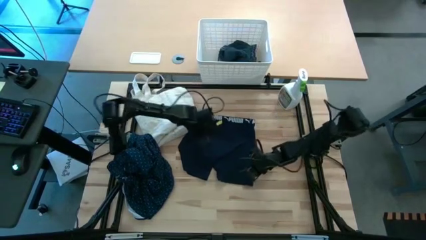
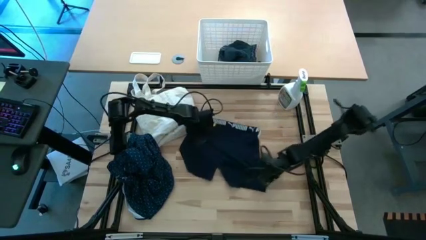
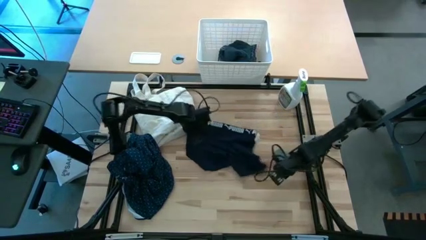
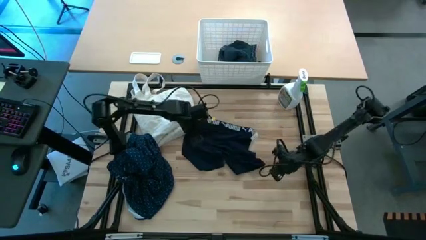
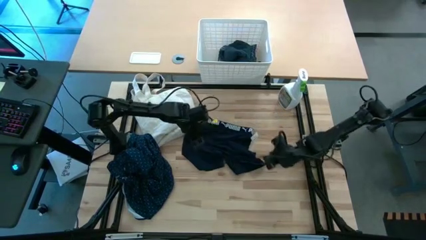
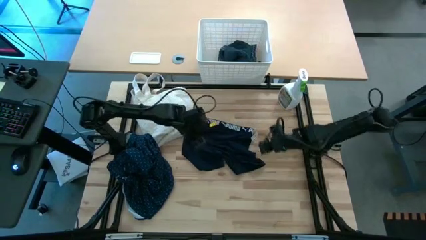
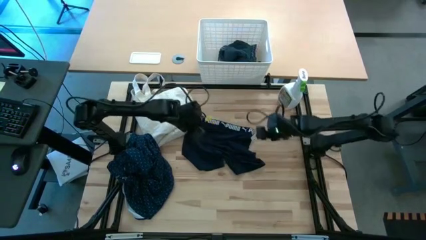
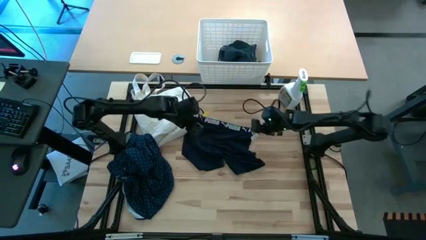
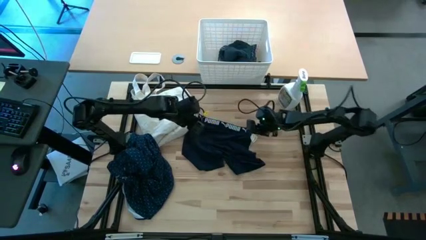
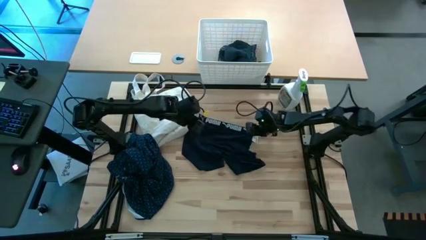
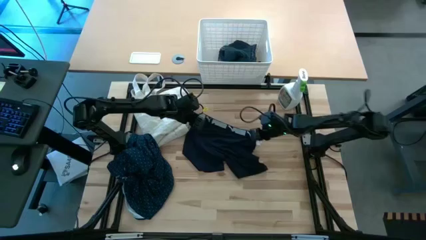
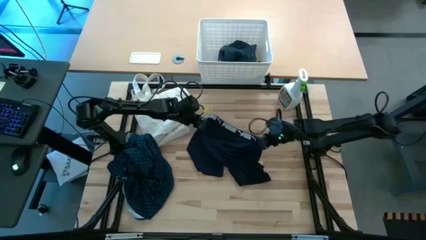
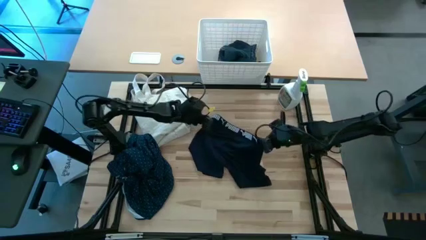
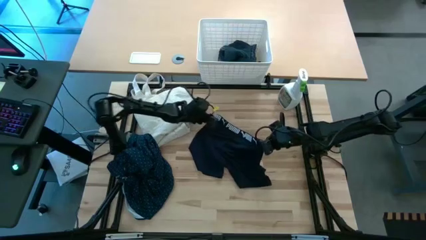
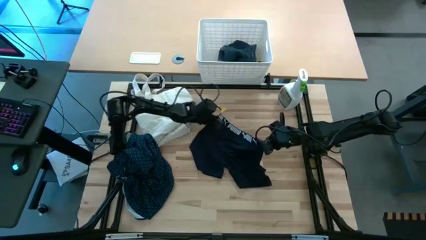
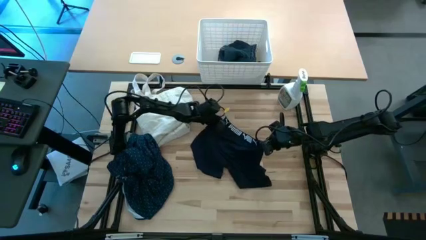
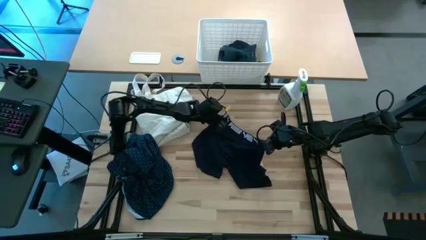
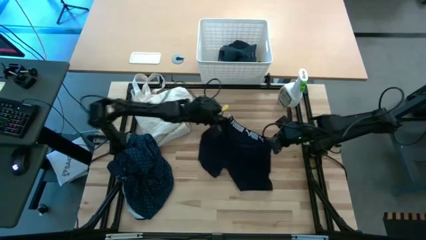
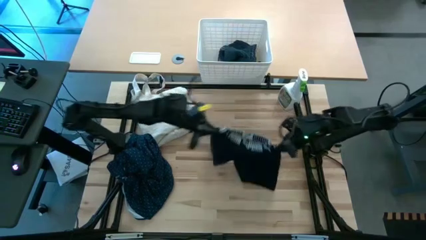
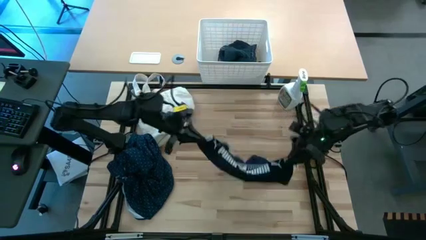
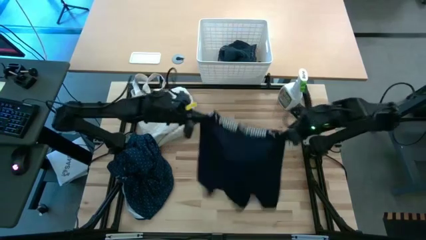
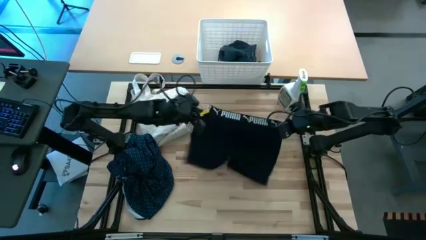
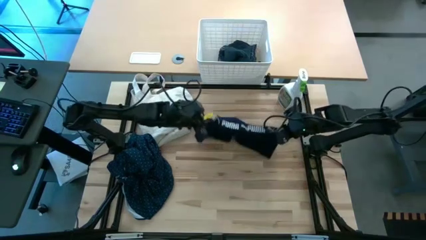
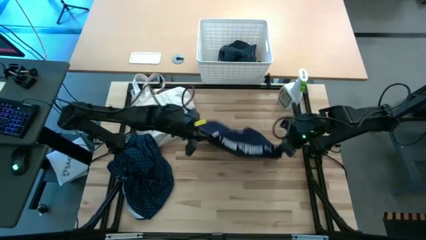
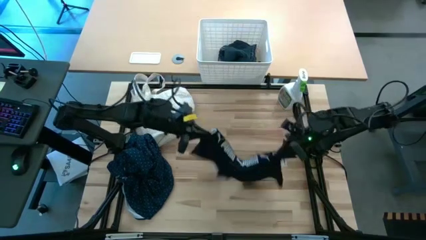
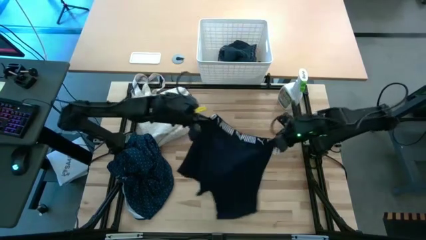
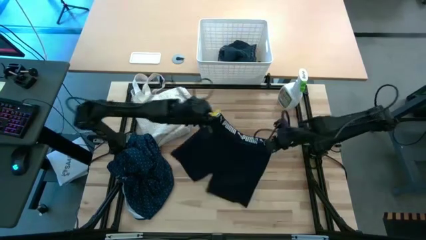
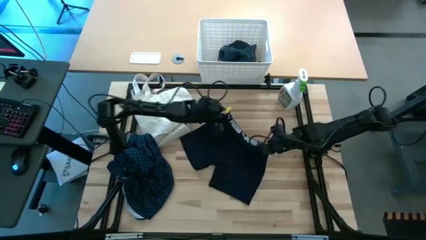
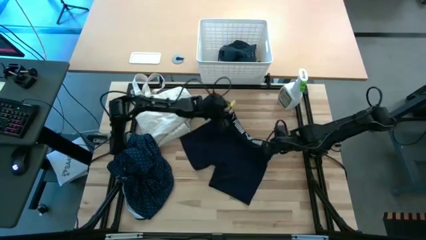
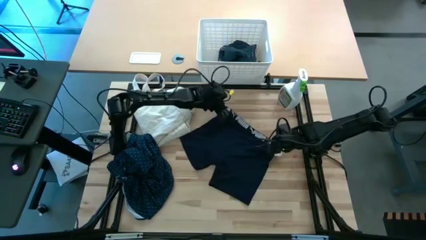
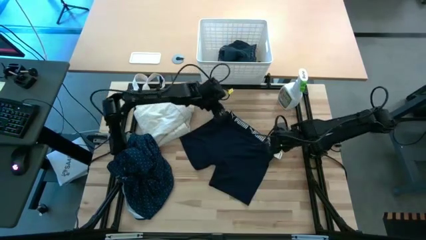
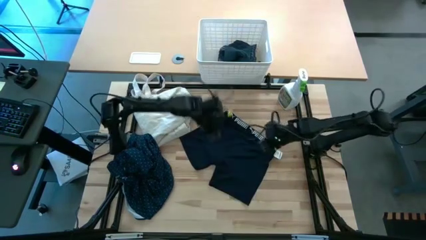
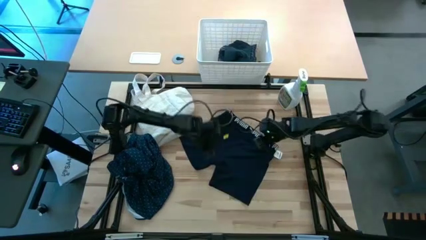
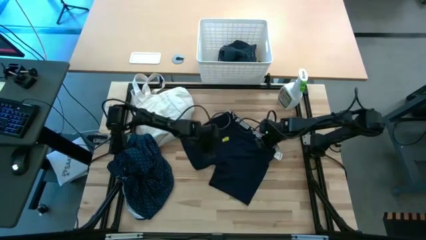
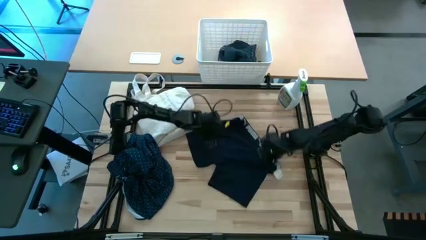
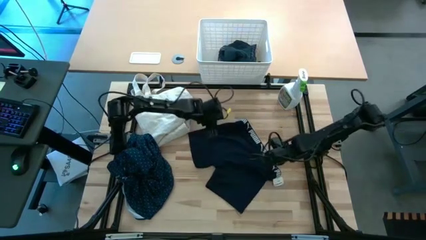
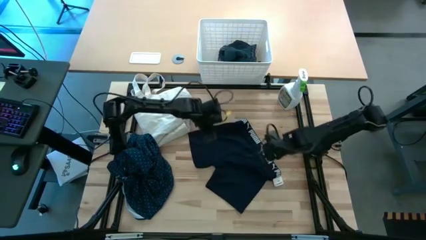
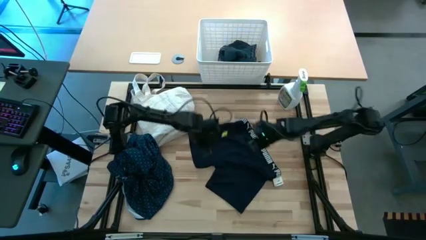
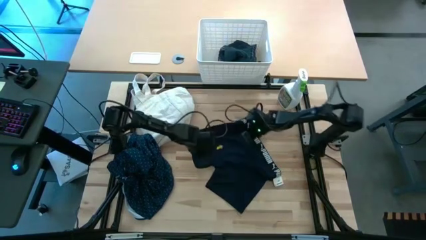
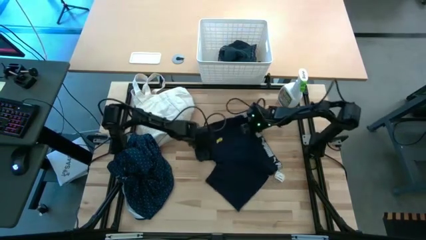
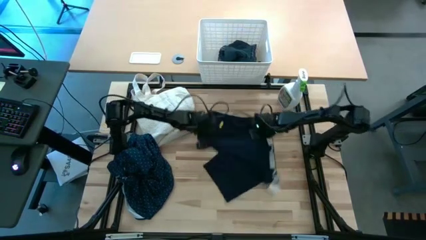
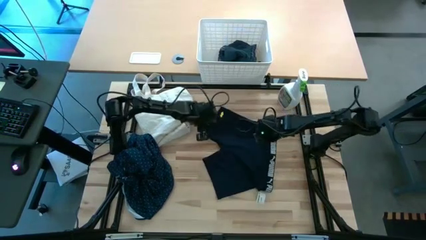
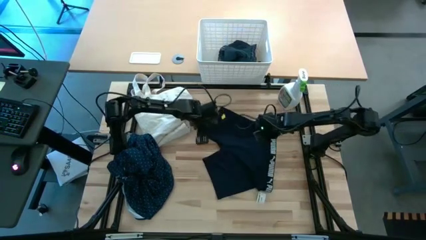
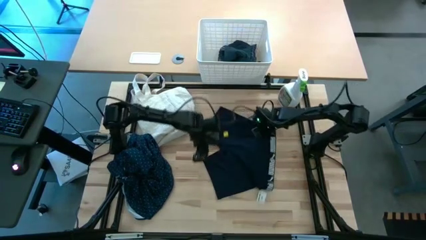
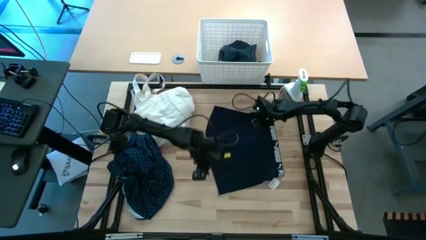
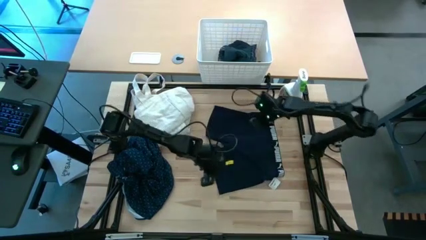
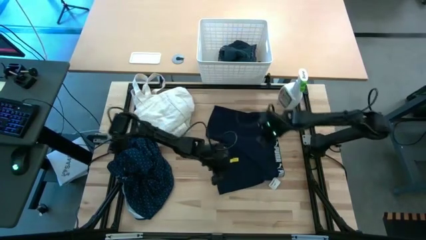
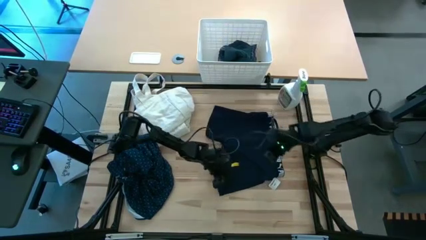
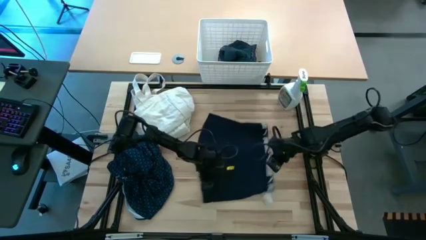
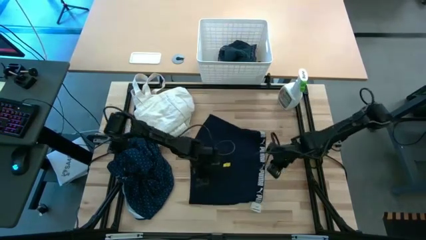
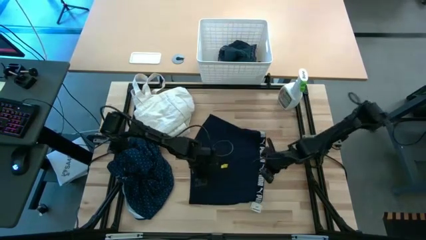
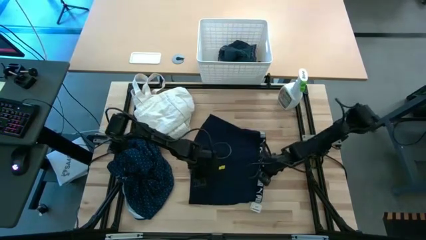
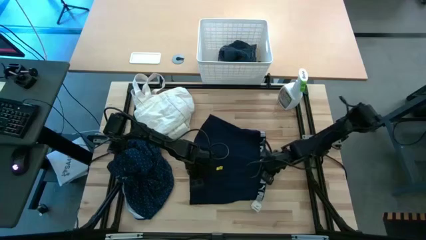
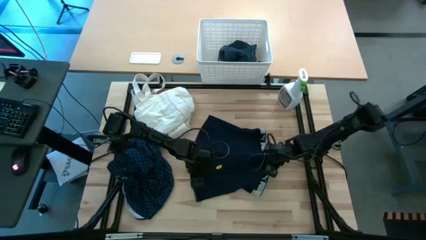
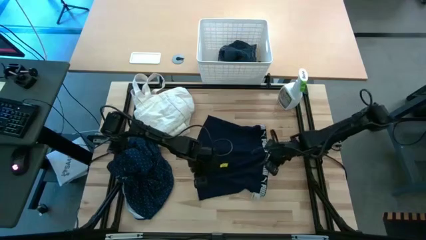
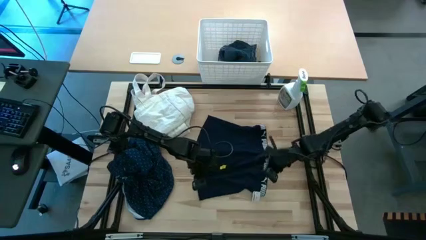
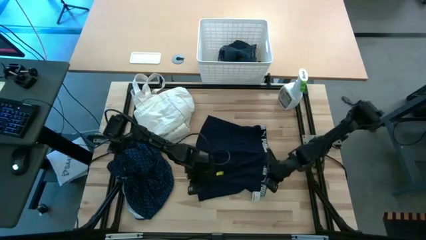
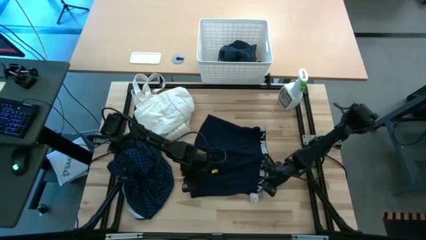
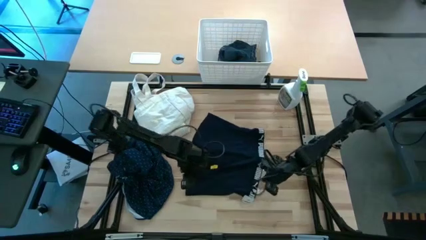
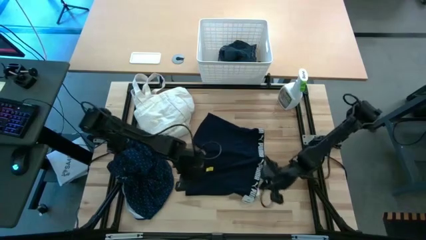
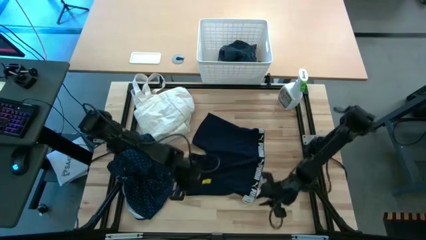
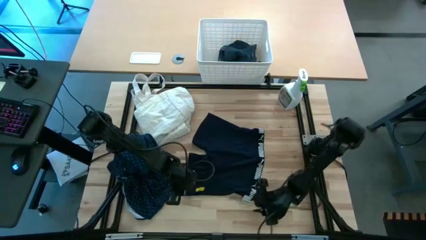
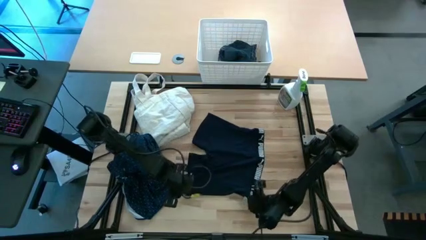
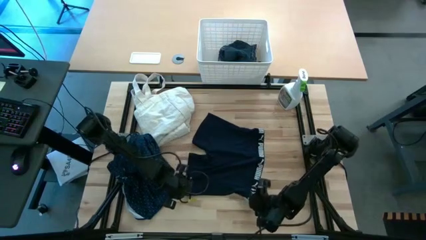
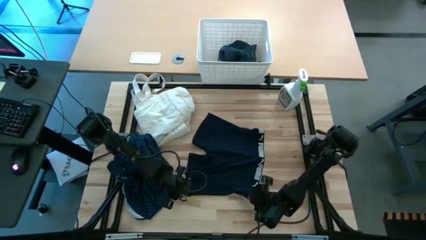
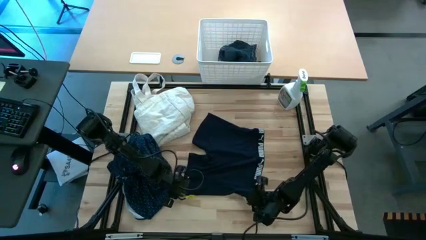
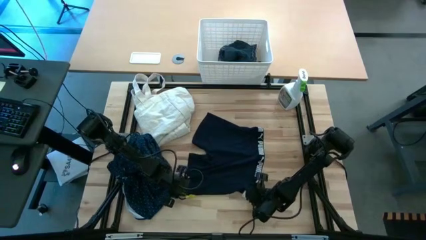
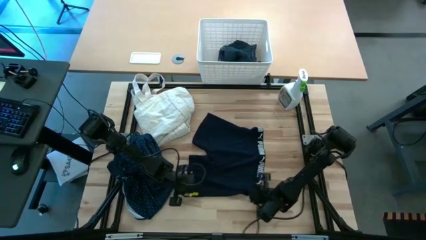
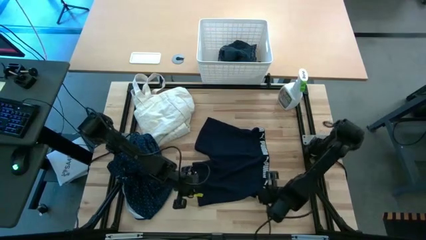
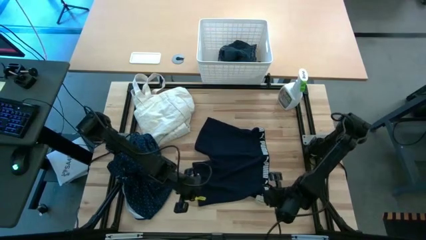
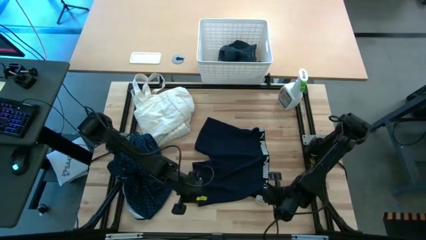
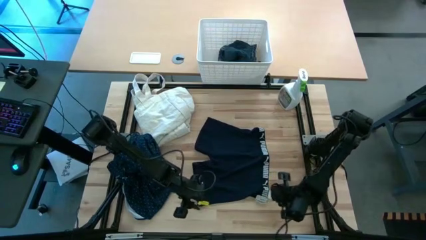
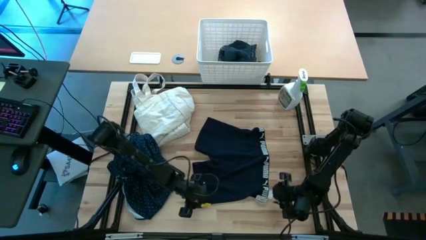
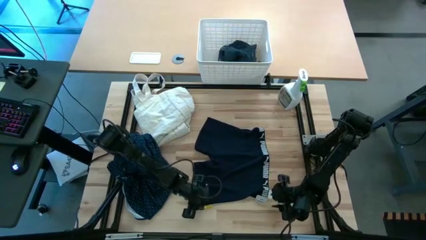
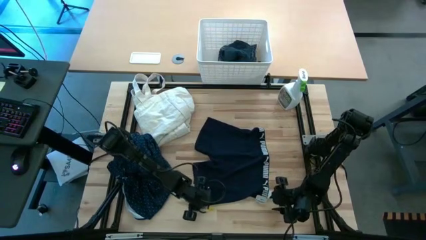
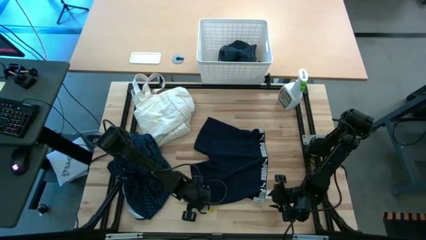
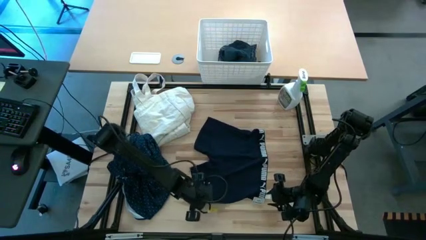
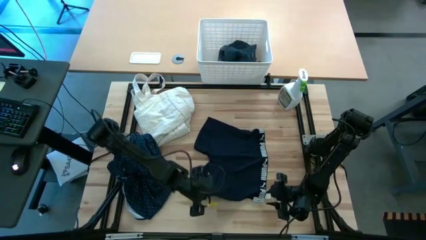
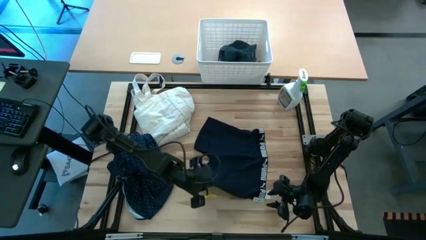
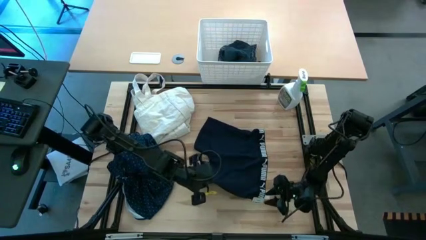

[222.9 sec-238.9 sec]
Fold the black boxer short
